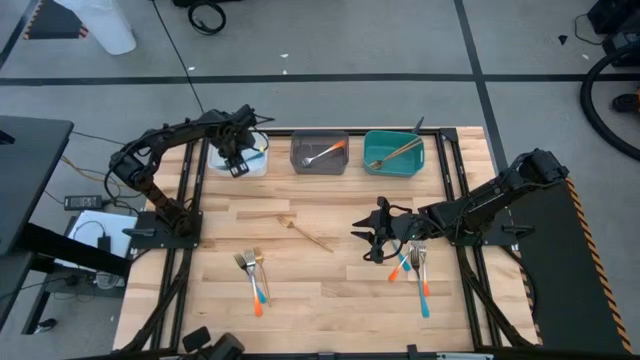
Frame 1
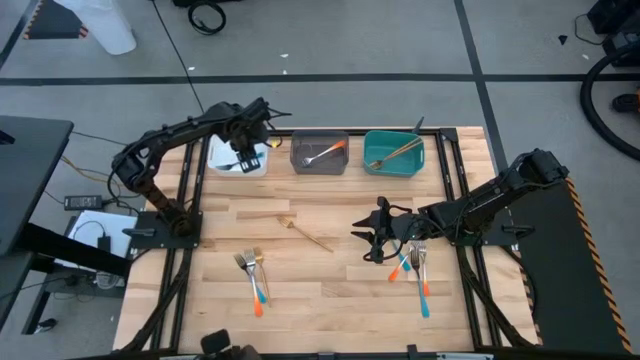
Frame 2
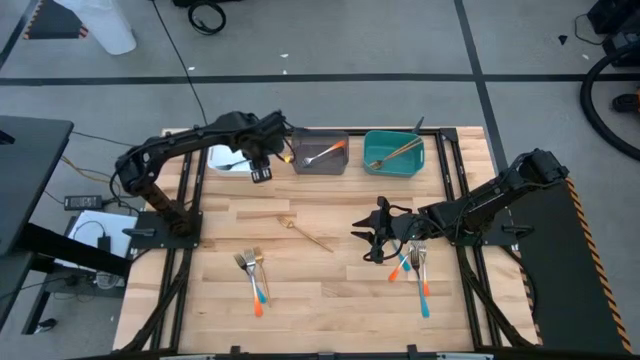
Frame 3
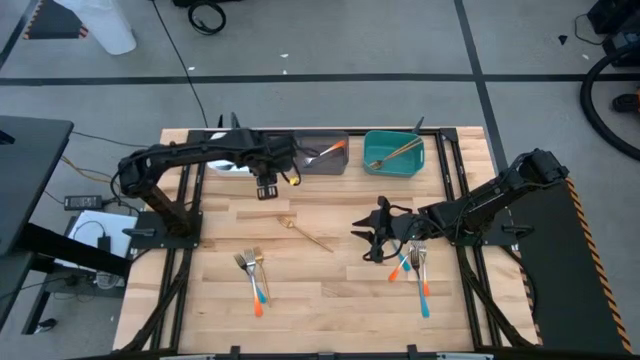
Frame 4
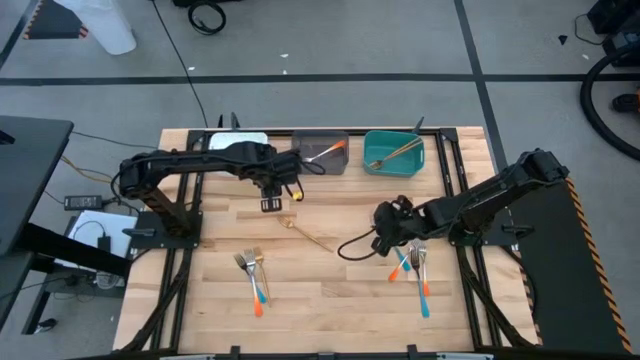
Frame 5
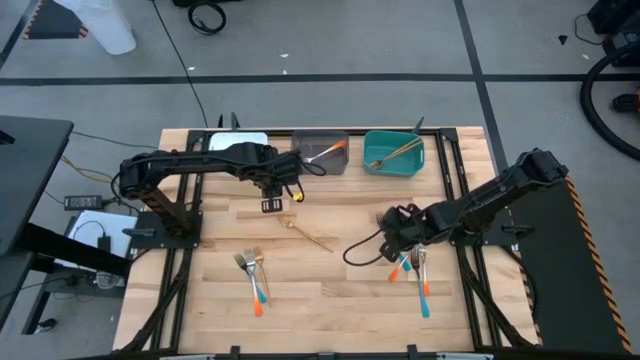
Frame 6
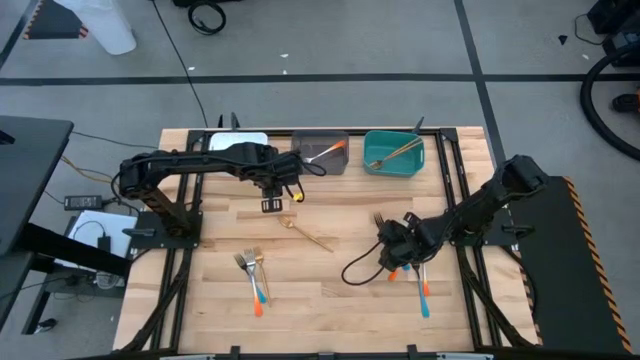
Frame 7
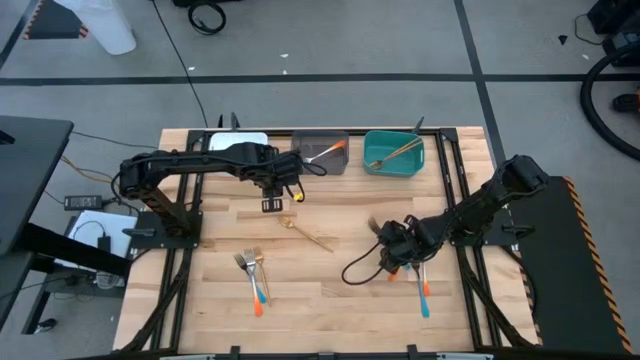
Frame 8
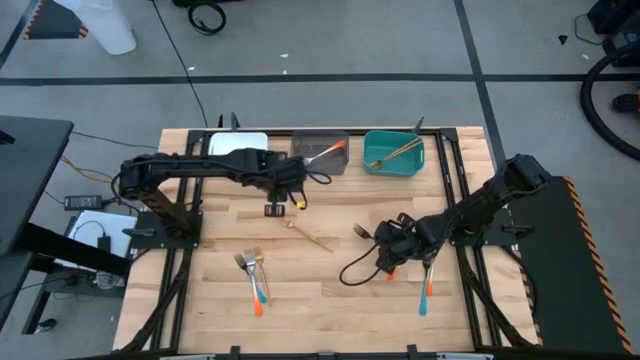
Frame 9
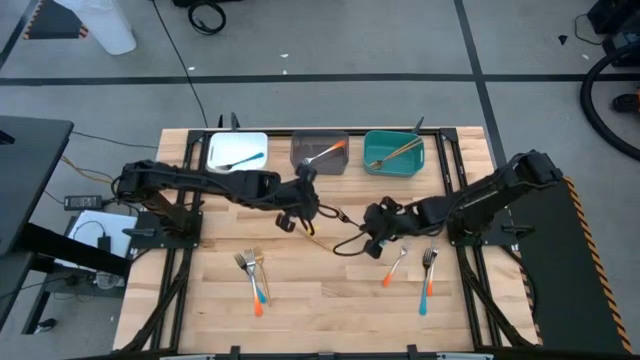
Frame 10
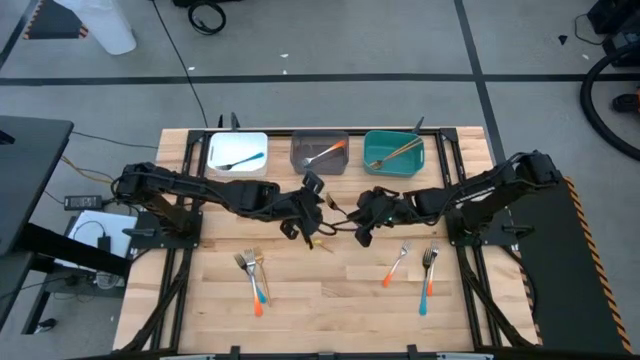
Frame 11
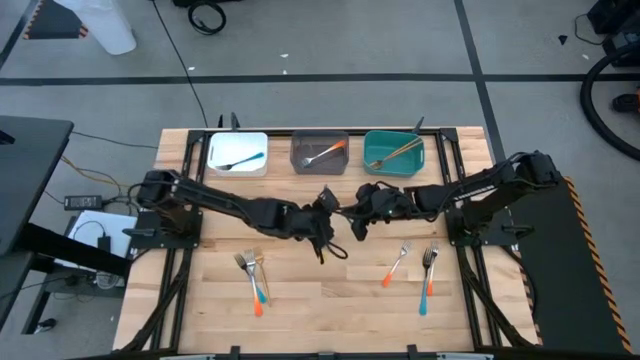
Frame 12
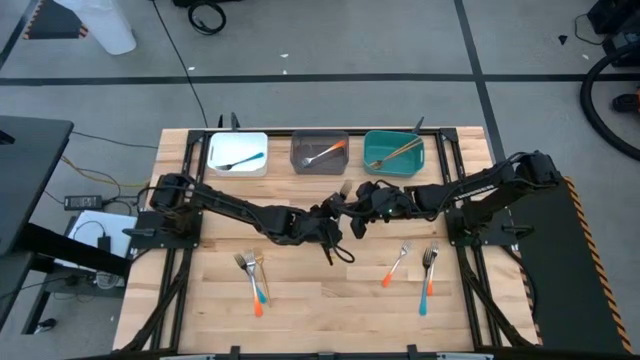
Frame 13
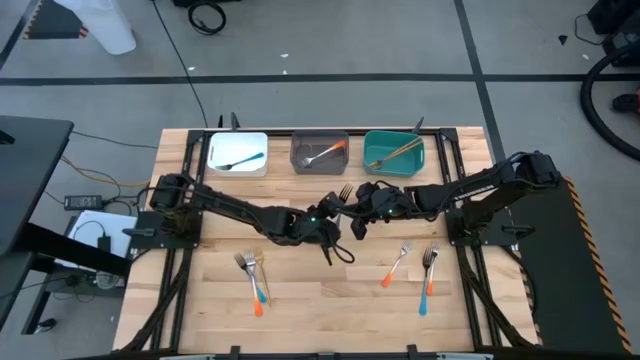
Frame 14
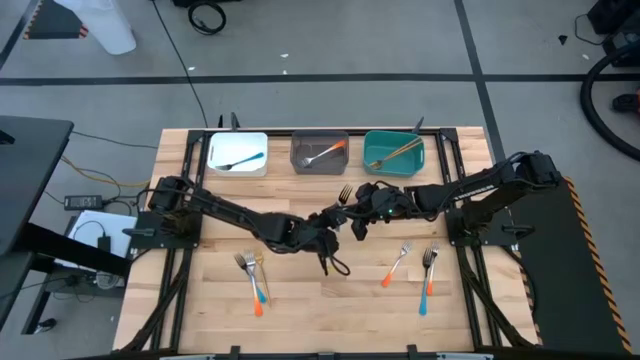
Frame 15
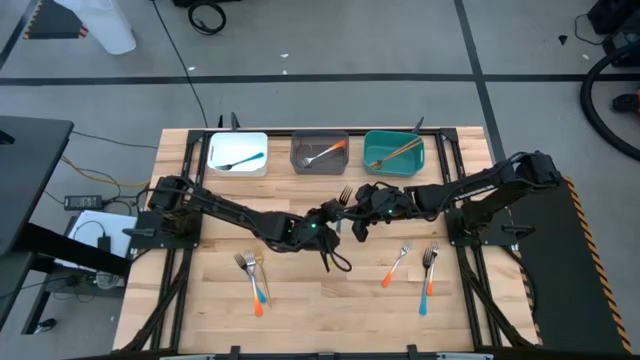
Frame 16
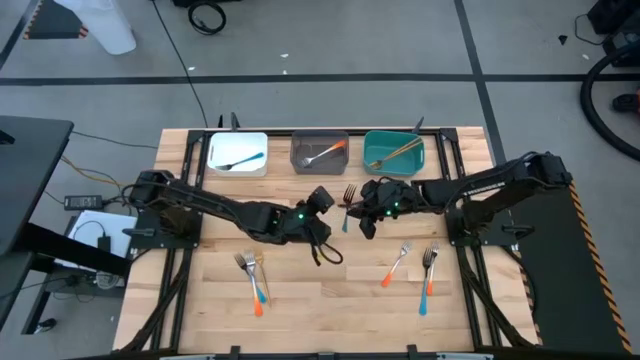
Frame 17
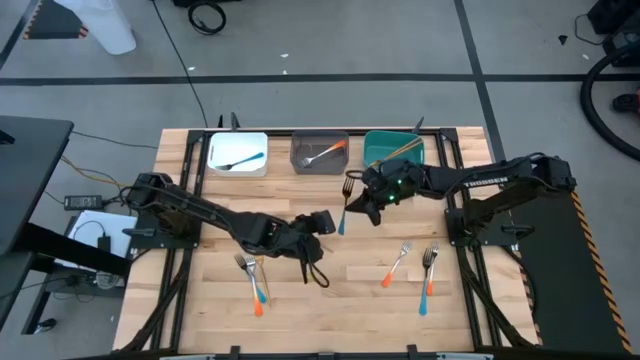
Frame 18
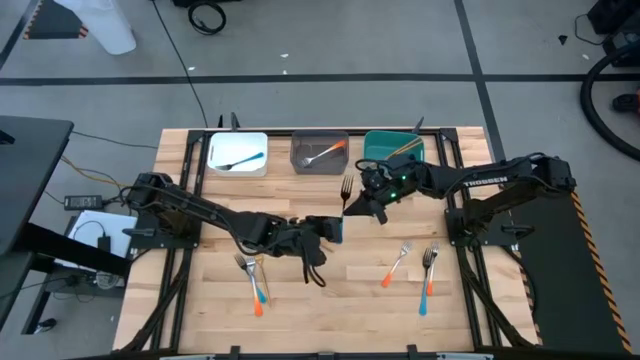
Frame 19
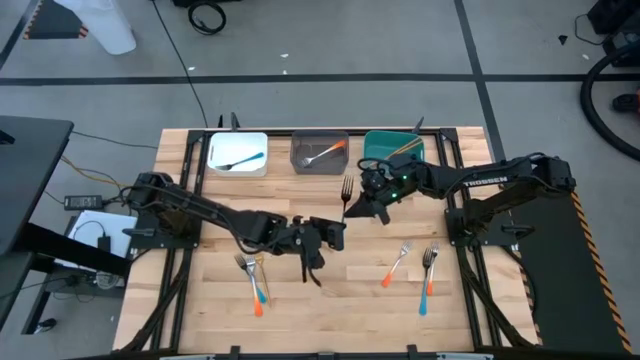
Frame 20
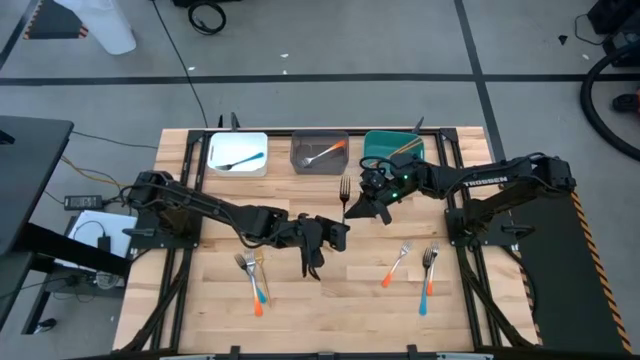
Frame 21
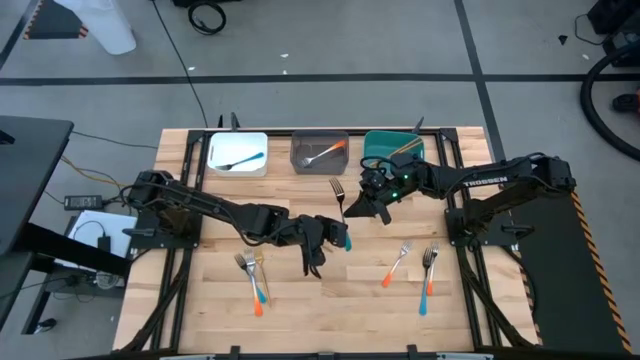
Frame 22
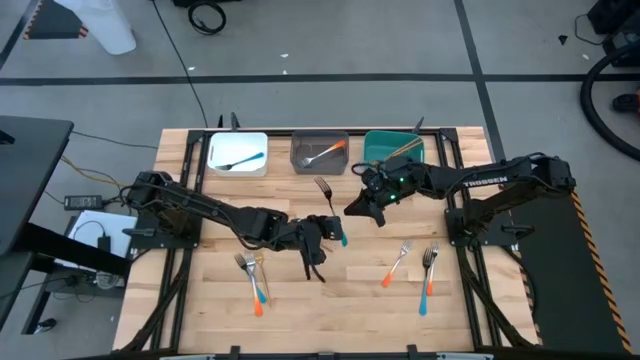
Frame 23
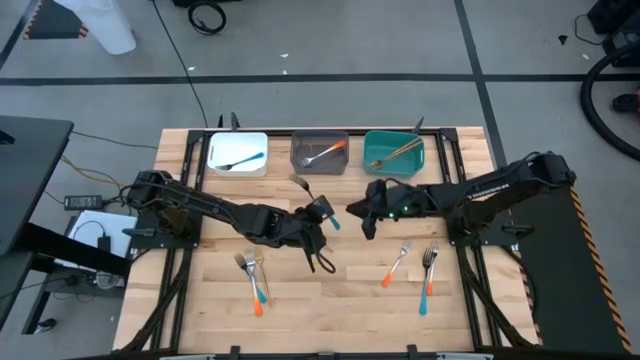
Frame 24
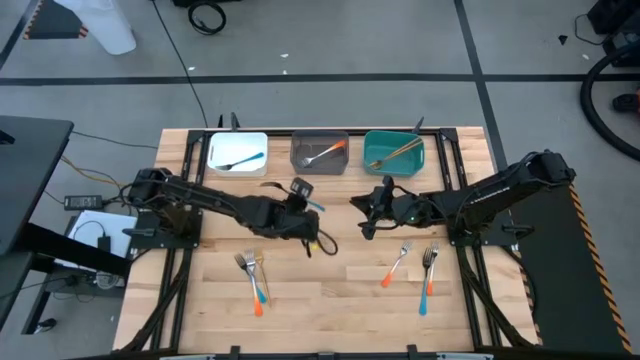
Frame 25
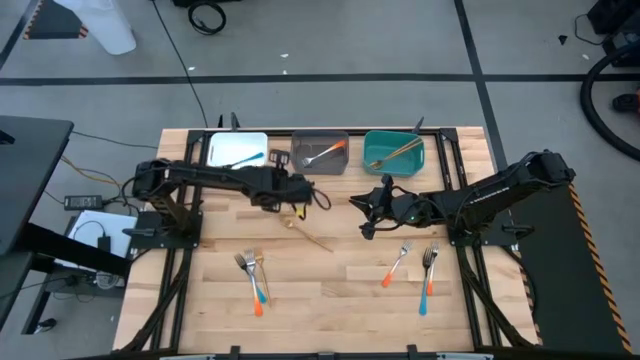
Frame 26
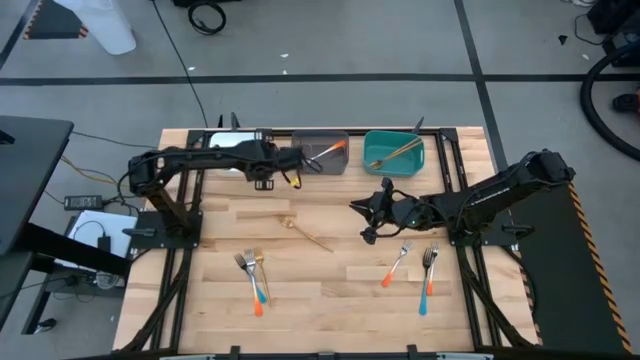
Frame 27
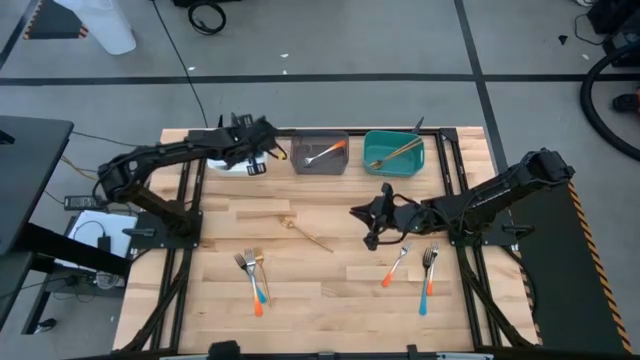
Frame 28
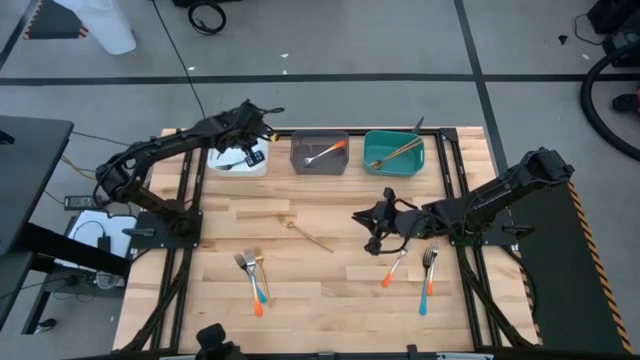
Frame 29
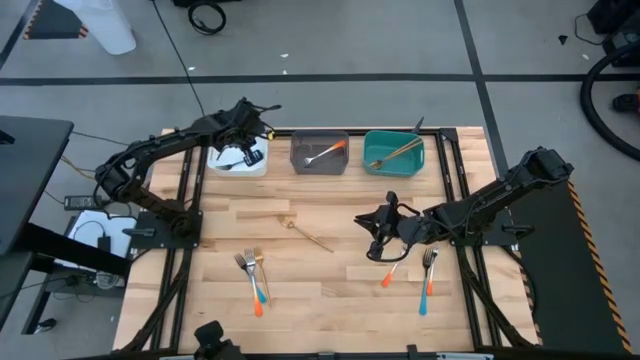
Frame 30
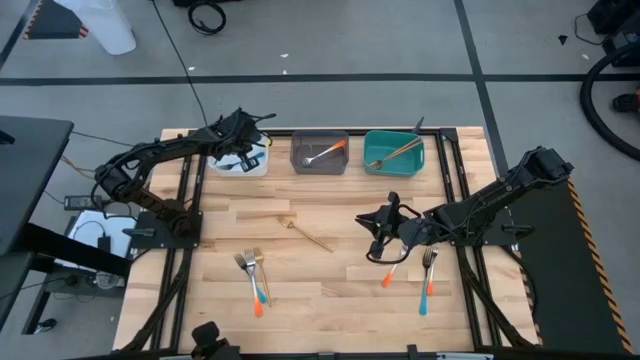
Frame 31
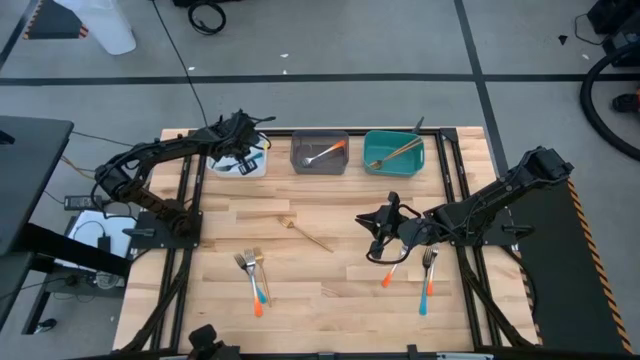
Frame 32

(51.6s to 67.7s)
Task: Sort silverware by color (type)
Put the blue fork into the white bin

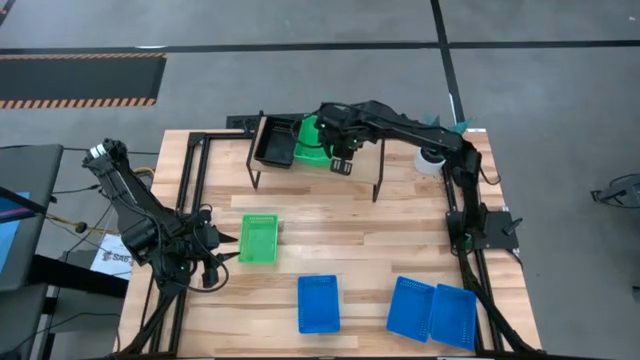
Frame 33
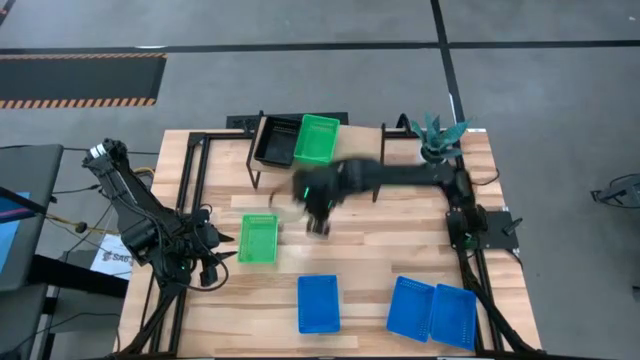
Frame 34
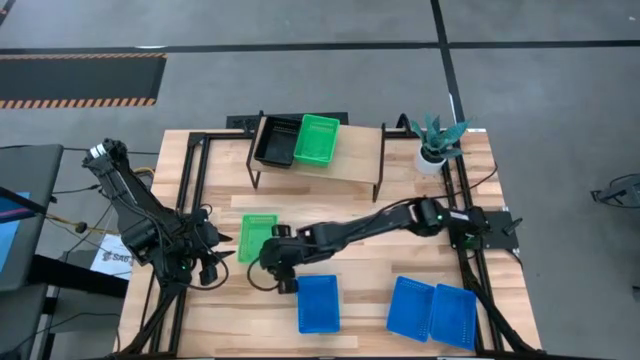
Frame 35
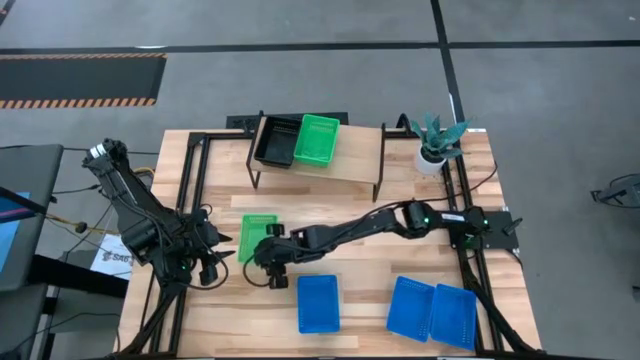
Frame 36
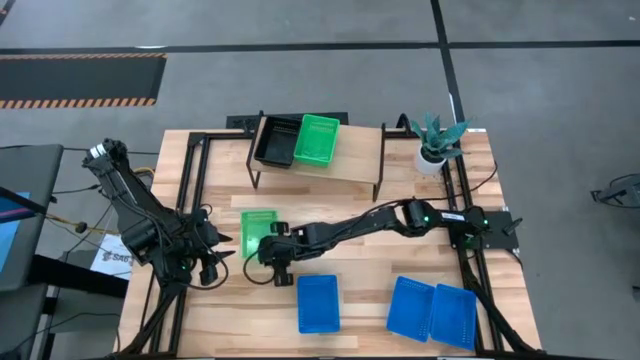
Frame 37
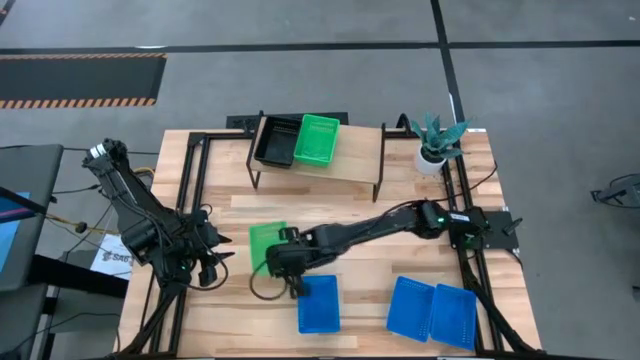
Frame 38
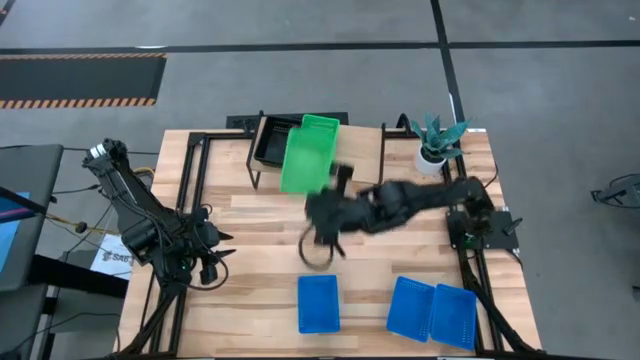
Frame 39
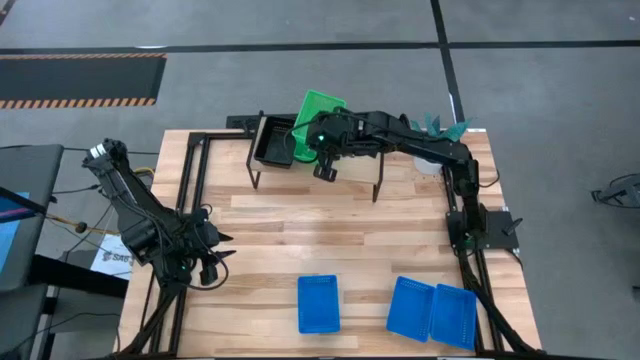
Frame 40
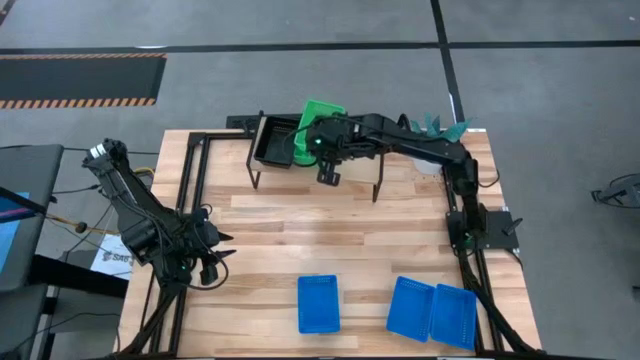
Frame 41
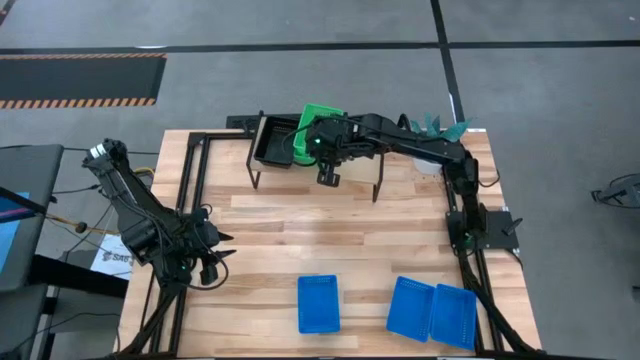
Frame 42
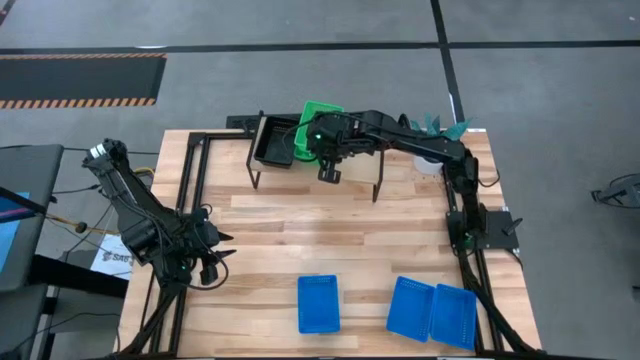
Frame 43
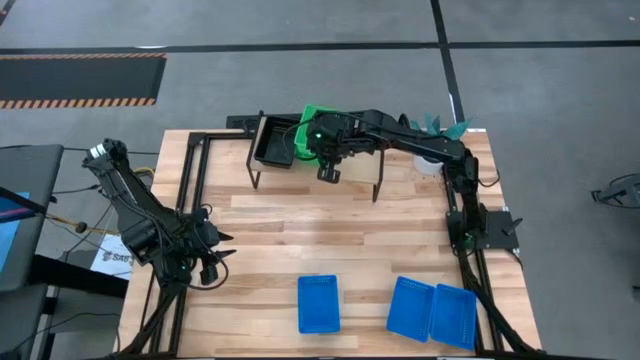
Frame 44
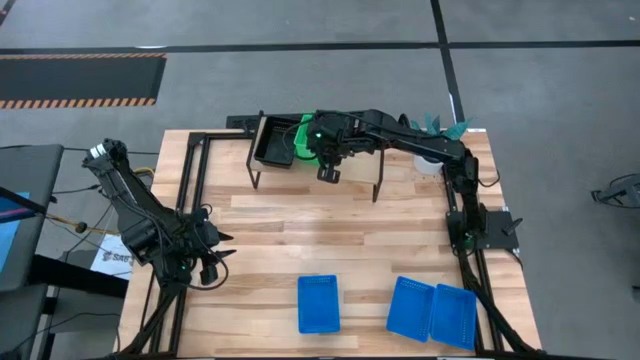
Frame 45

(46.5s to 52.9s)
Task: Stack baskets on shelf by color
Stack the green bin on the green bin
